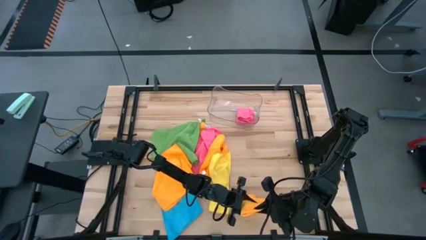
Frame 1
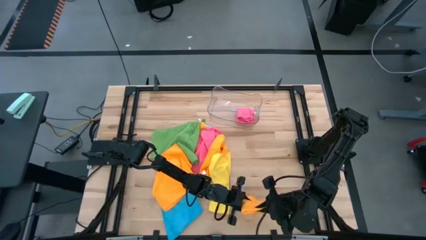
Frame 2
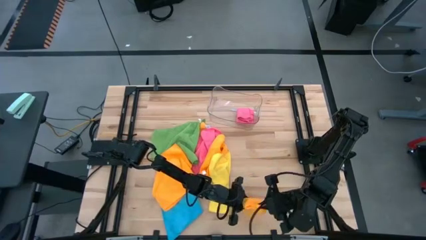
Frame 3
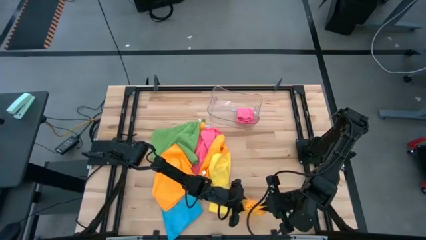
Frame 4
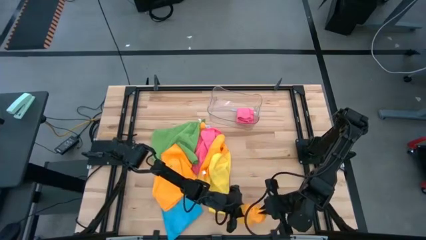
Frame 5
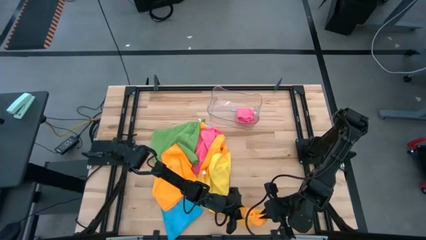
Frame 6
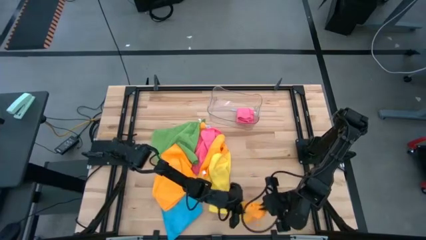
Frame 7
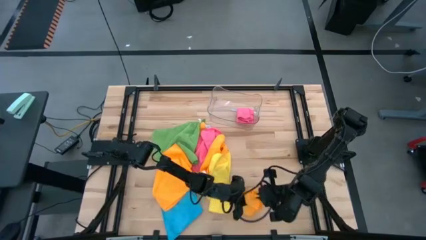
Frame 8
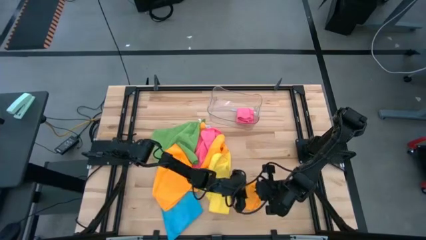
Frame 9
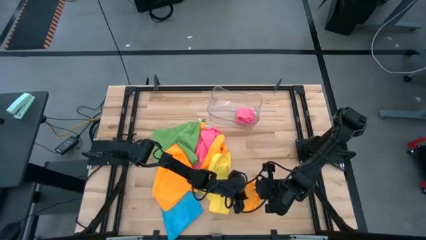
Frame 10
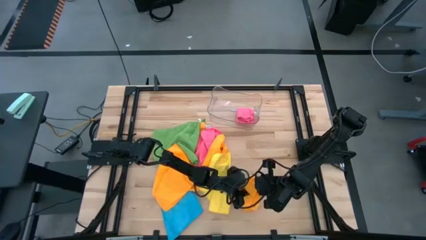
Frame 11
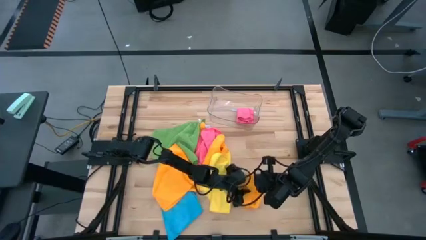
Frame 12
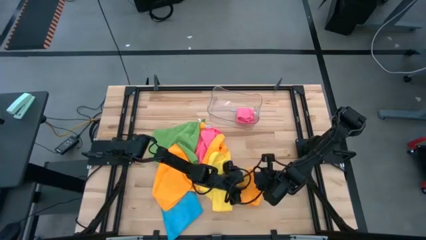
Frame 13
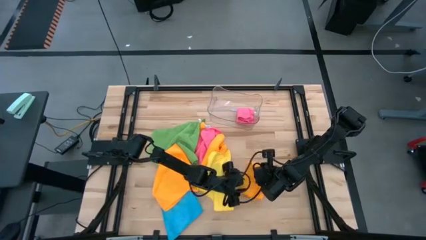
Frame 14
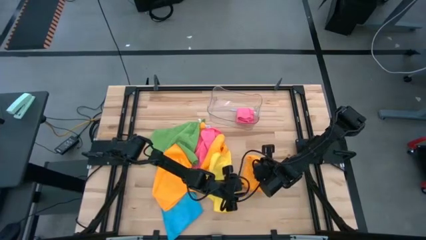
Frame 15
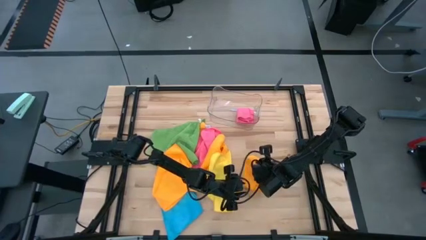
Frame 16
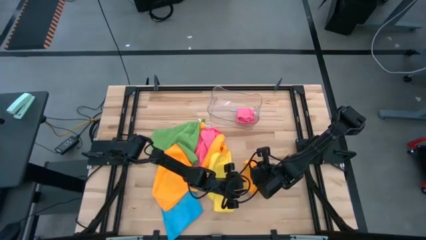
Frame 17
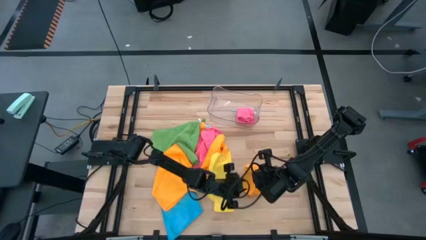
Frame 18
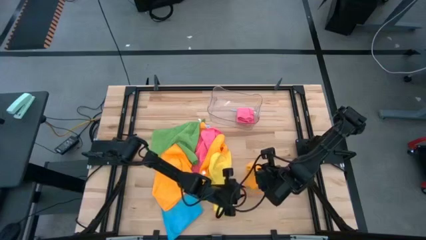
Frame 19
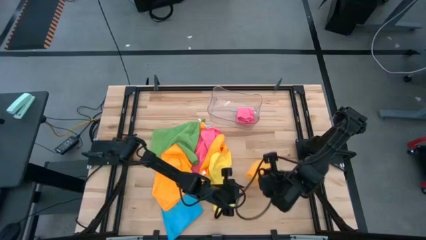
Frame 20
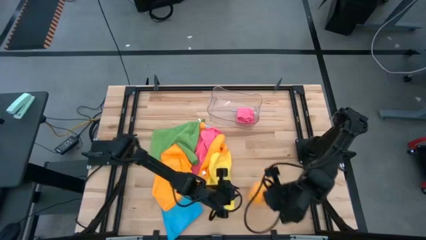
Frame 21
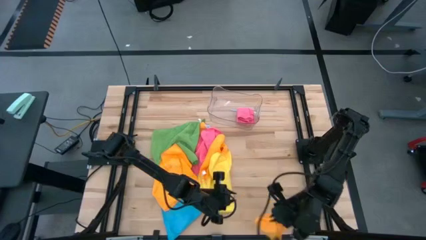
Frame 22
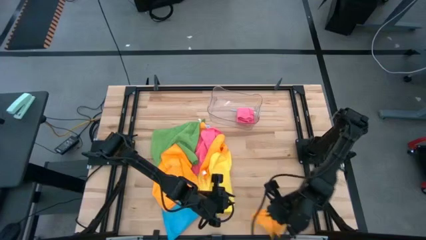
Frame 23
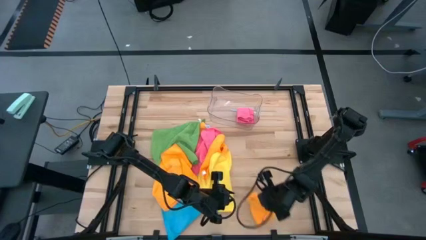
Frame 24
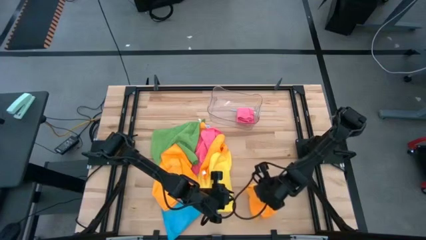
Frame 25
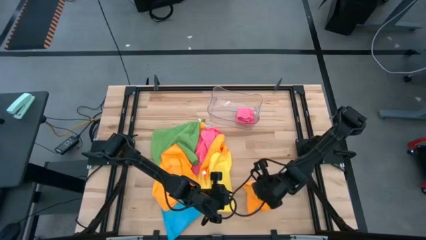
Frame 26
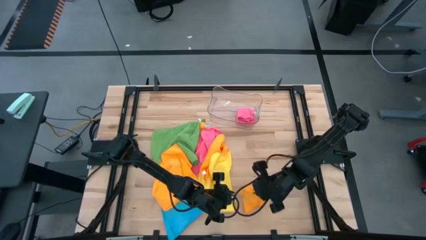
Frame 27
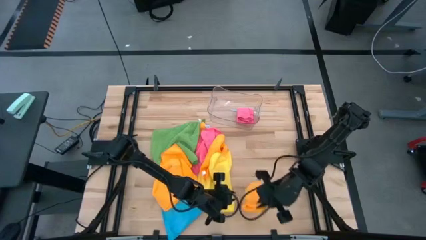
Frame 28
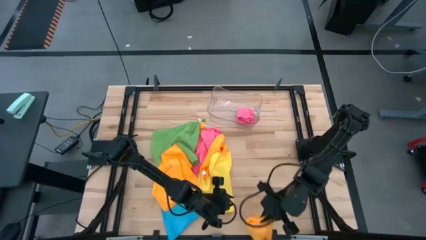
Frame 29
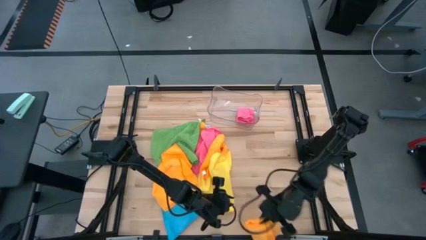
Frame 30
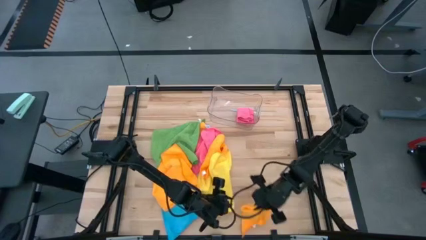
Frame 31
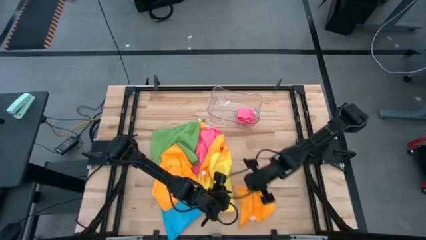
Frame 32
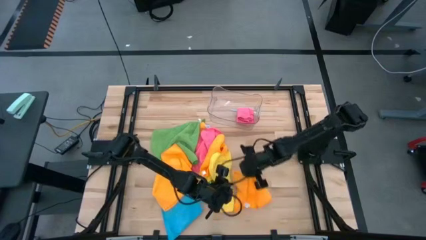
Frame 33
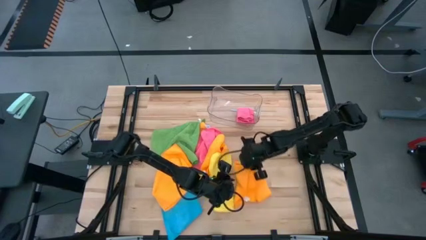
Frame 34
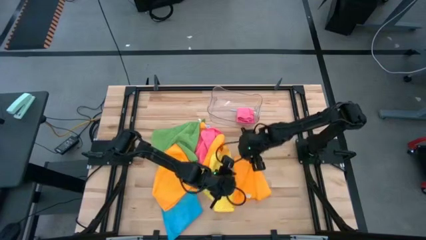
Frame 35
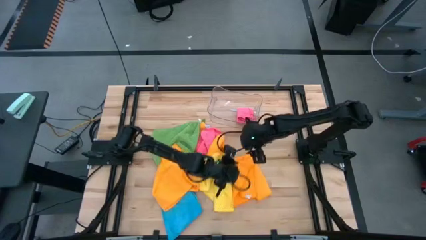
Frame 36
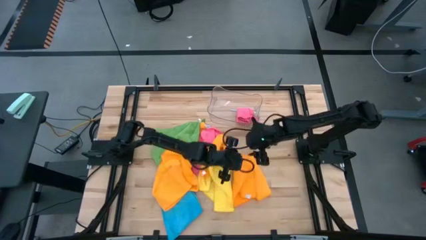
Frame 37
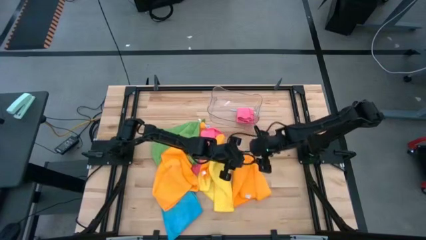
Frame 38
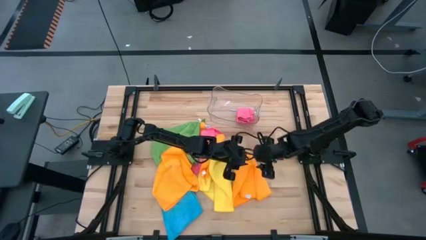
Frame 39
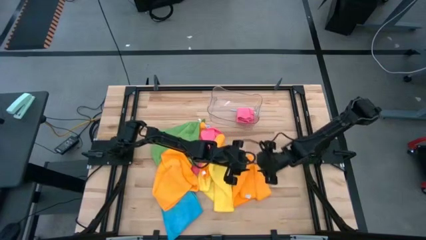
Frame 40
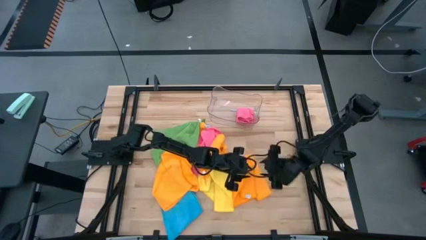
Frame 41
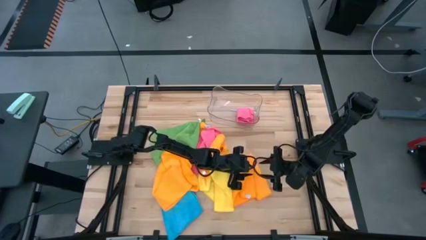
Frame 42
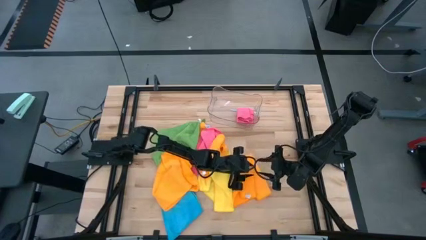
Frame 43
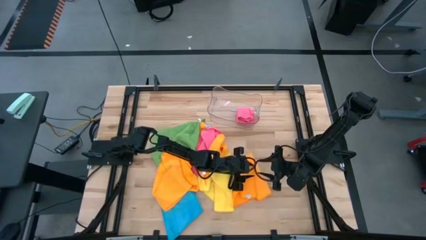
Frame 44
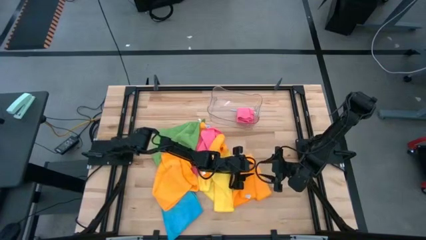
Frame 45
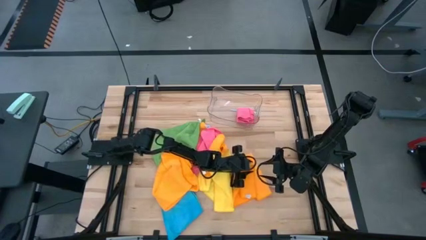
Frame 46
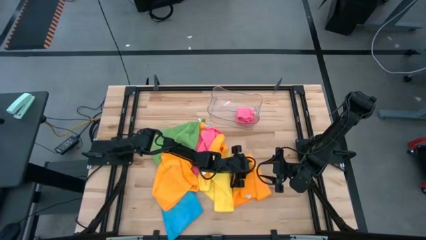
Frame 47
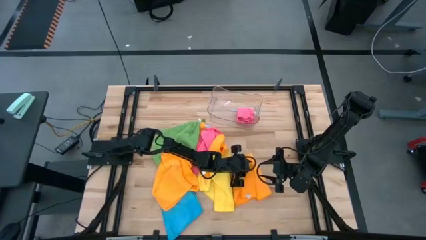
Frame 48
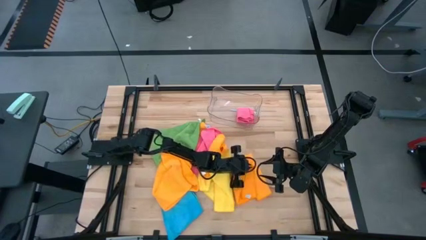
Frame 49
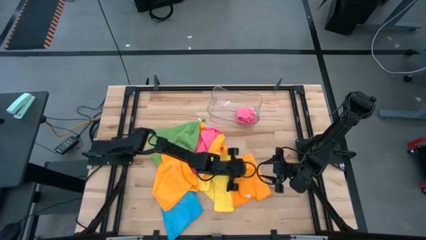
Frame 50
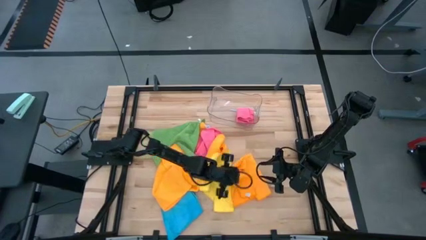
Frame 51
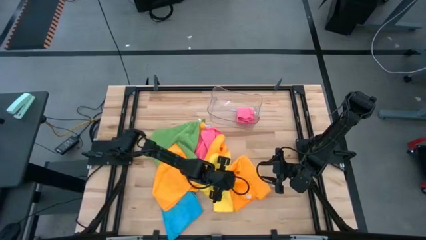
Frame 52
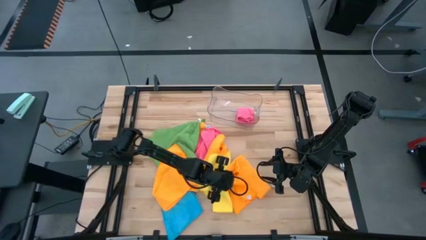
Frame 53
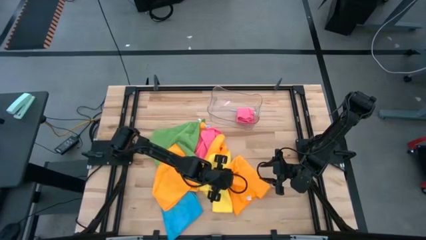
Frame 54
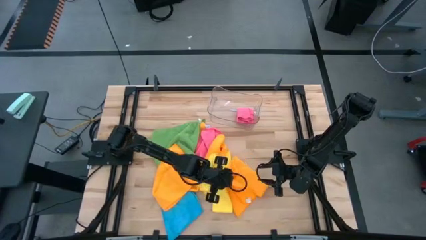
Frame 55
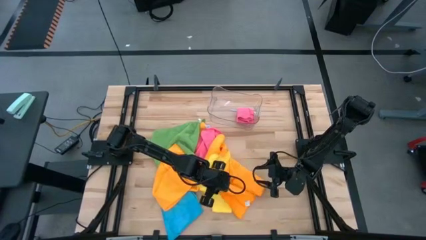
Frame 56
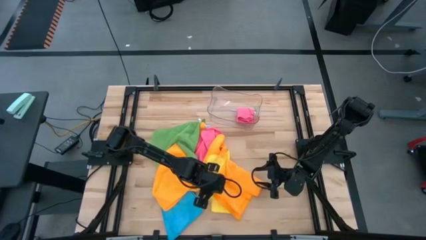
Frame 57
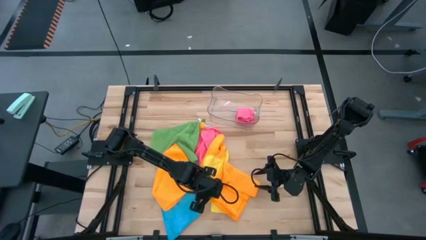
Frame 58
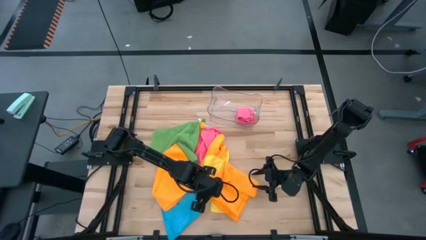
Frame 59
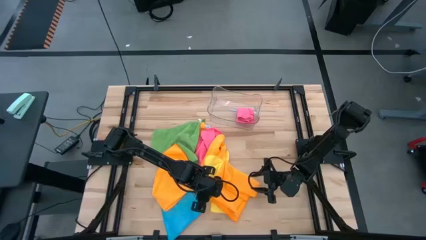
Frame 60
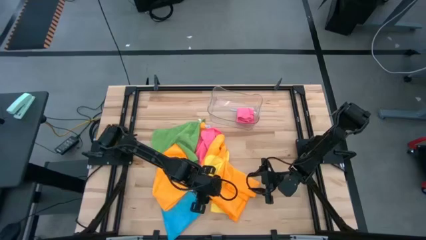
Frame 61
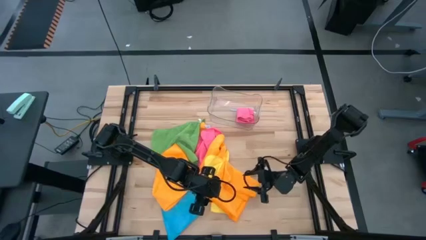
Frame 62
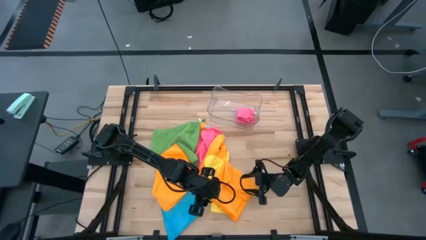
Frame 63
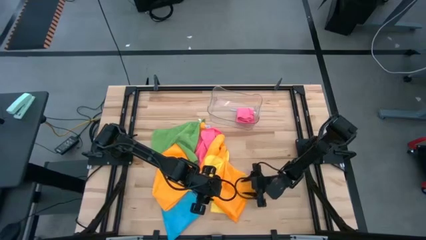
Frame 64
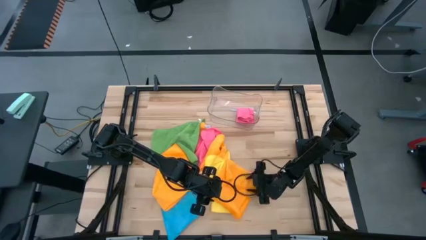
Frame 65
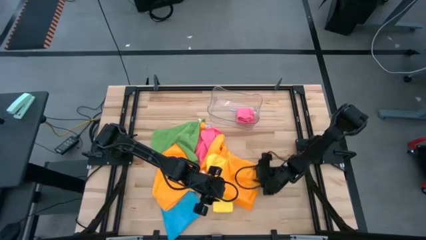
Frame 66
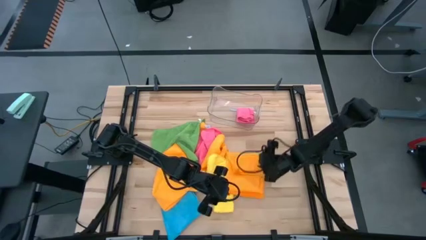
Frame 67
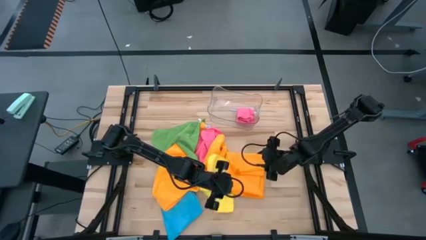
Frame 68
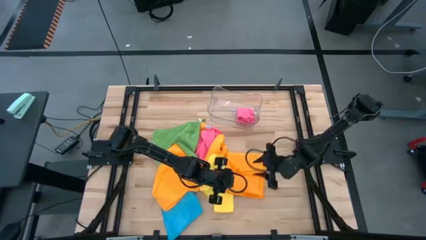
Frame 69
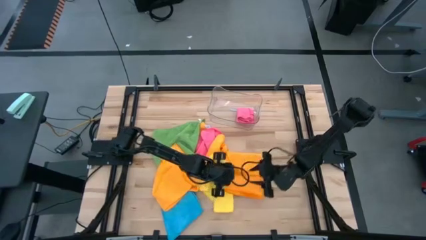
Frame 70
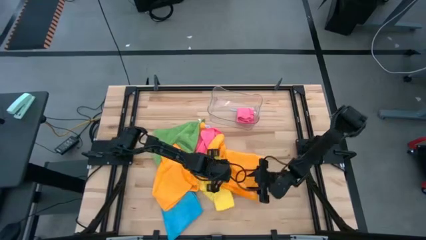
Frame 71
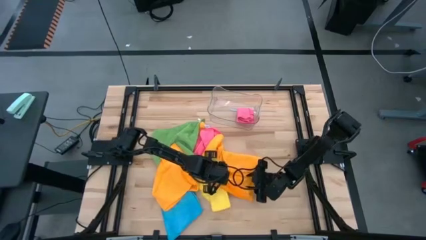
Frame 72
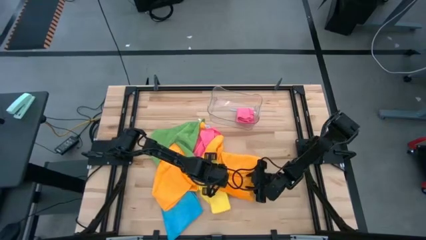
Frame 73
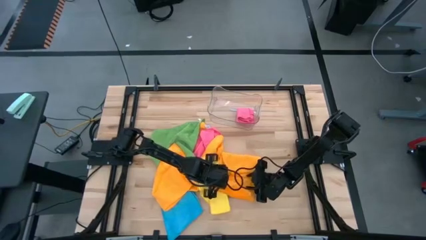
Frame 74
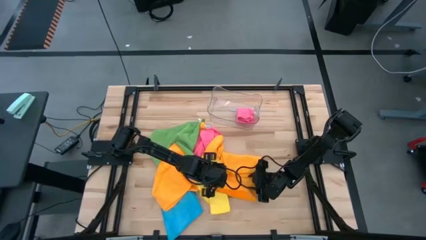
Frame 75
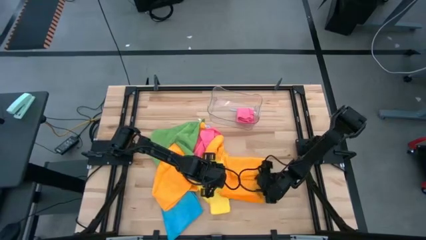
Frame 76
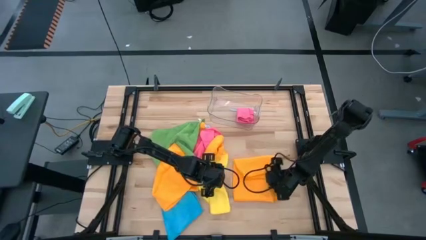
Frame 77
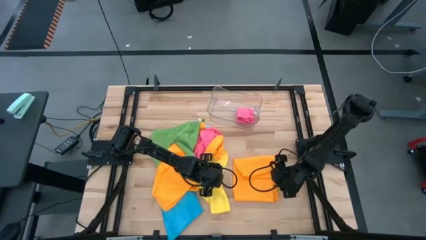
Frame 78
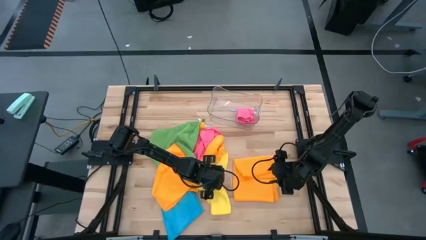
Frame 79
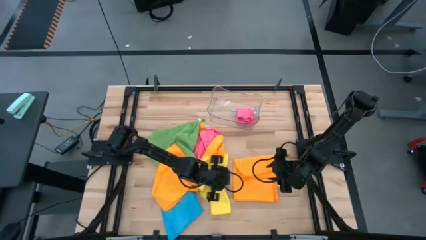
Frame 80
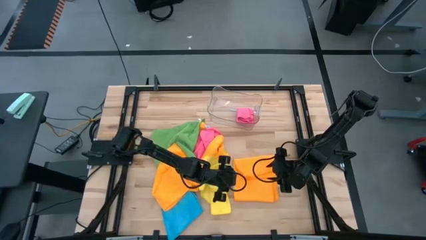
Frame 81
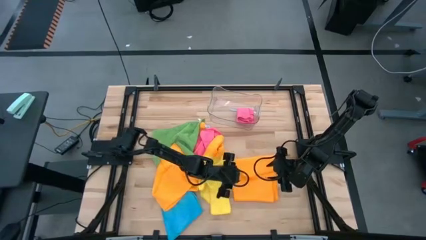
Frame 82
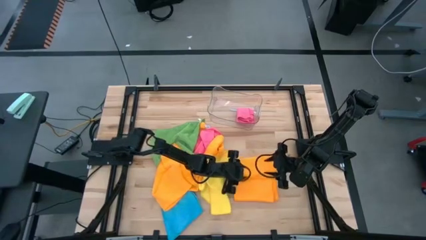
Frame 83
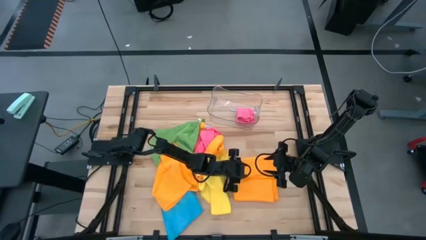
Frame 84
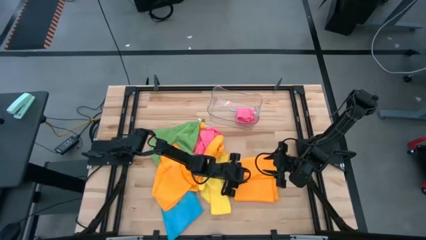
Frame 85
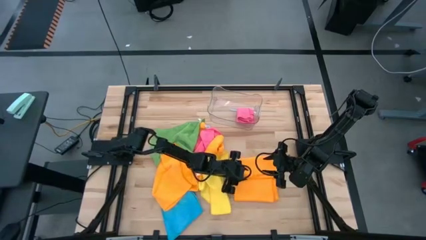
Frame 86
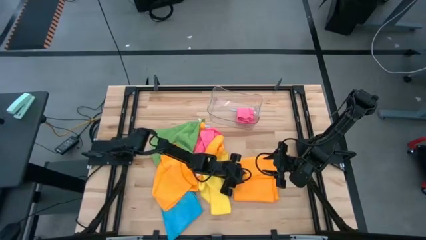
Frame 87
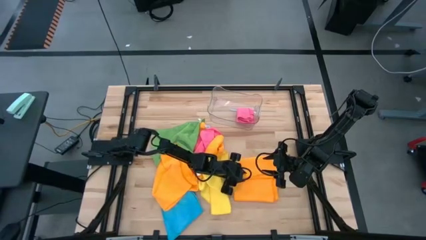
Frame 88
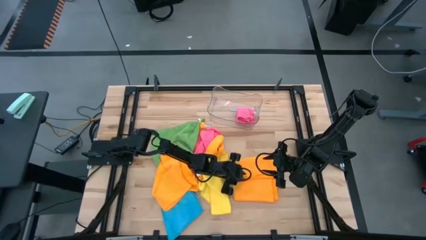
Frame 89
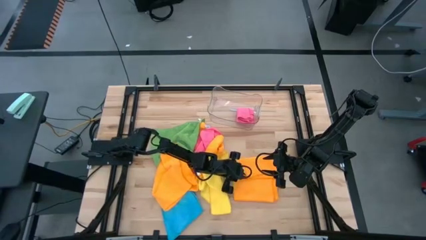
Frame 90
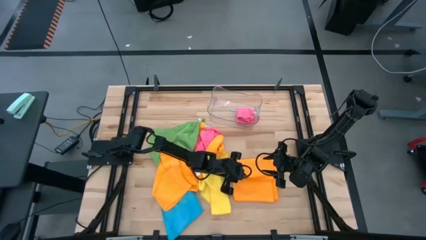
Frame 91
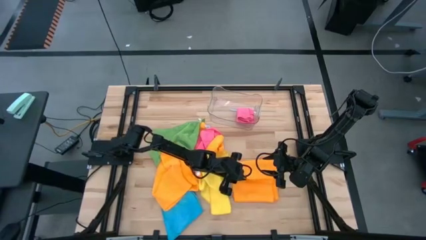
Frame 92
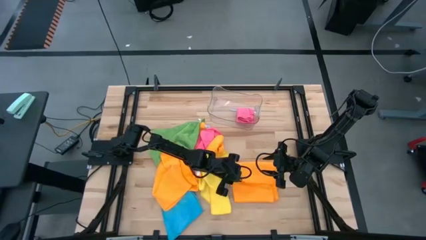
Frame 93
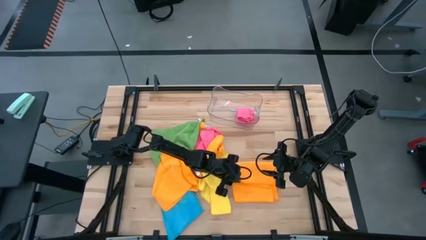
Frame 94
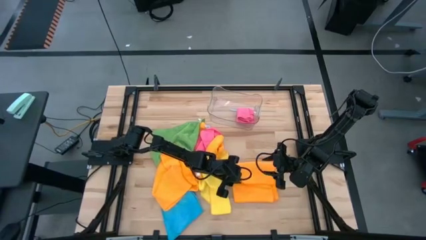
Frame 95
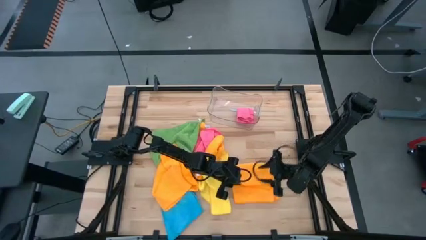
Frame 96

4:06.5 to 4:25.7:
Task: Fold microfiber towels
Fold the right orange microfiber cloth
